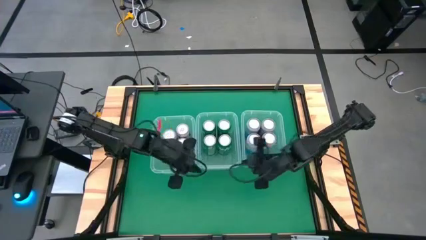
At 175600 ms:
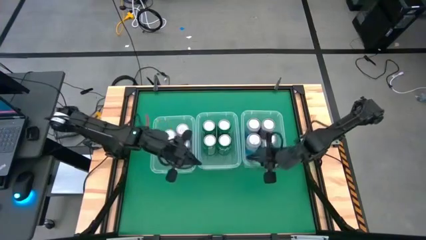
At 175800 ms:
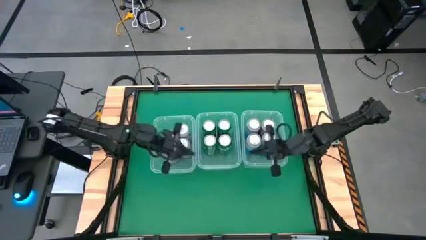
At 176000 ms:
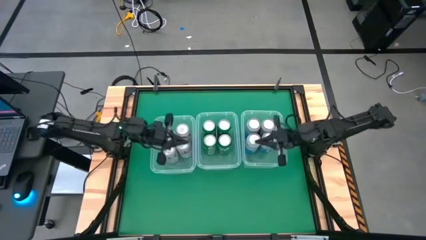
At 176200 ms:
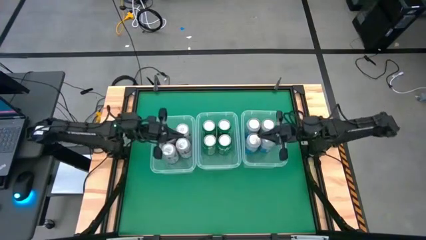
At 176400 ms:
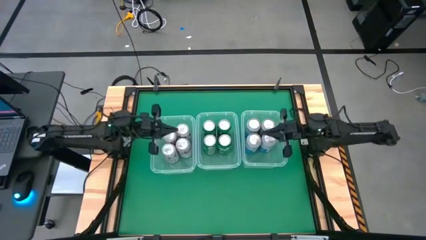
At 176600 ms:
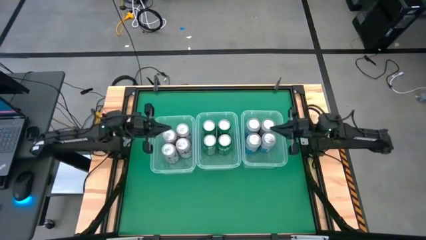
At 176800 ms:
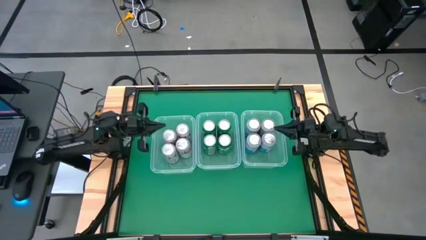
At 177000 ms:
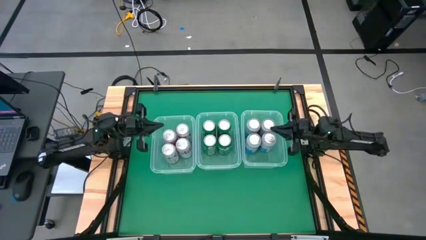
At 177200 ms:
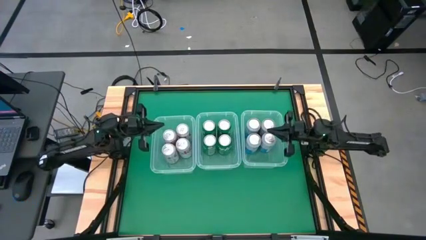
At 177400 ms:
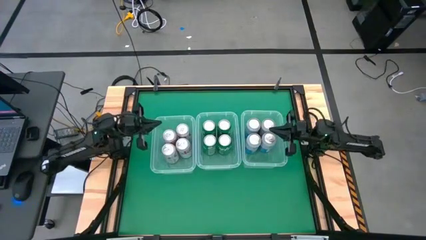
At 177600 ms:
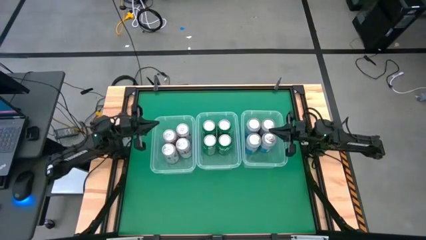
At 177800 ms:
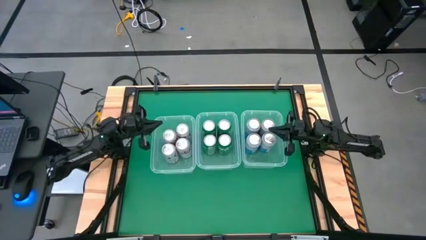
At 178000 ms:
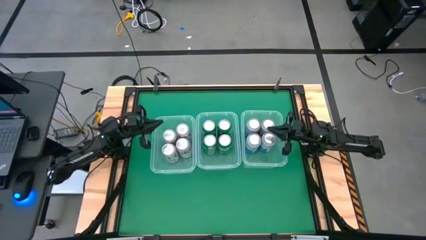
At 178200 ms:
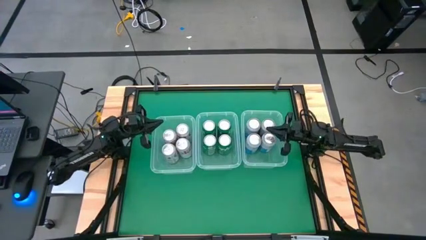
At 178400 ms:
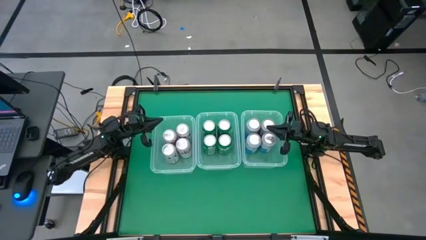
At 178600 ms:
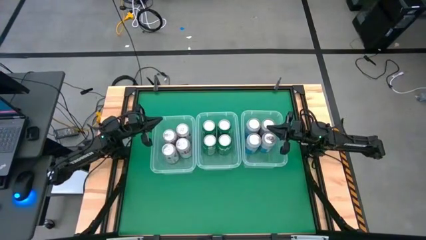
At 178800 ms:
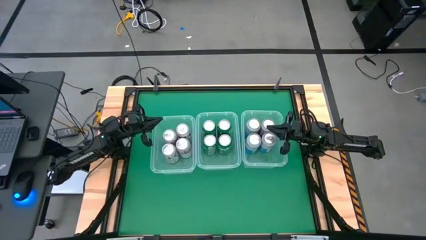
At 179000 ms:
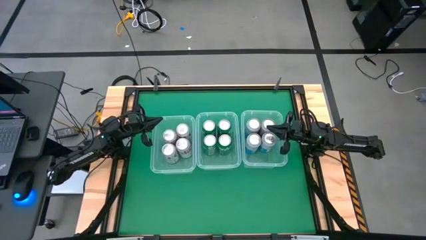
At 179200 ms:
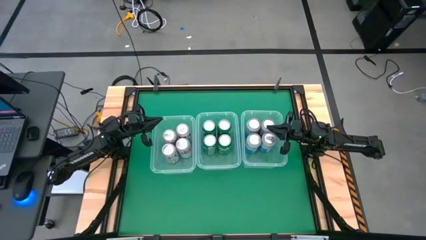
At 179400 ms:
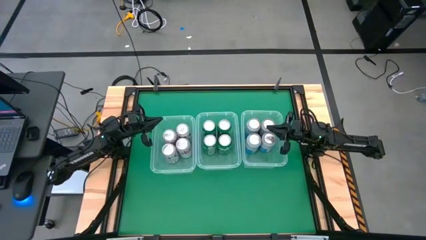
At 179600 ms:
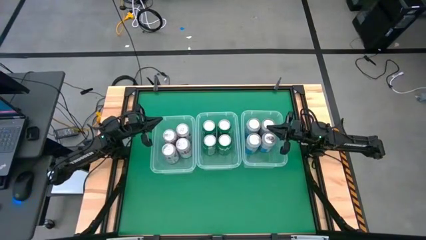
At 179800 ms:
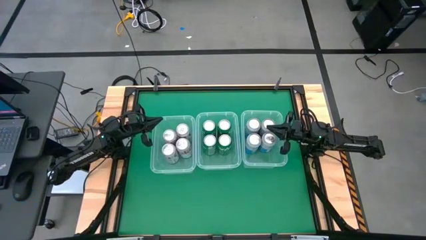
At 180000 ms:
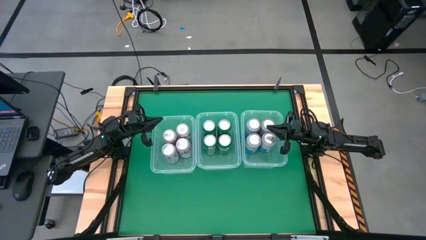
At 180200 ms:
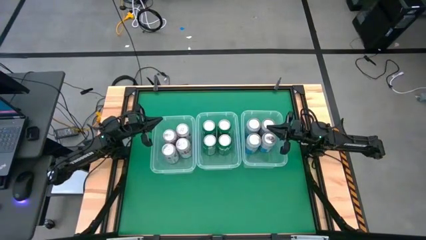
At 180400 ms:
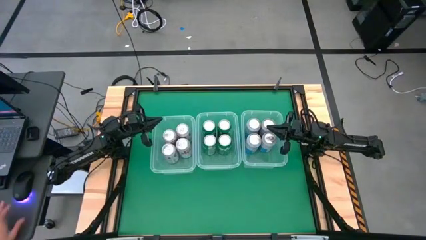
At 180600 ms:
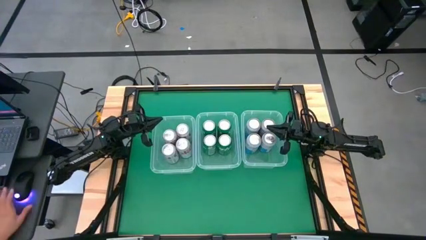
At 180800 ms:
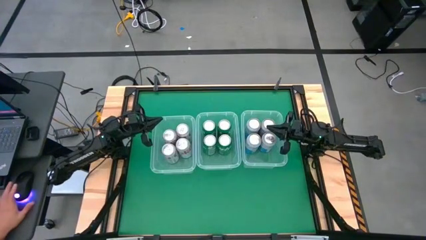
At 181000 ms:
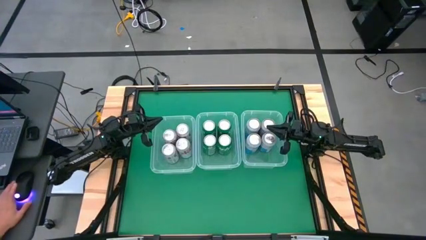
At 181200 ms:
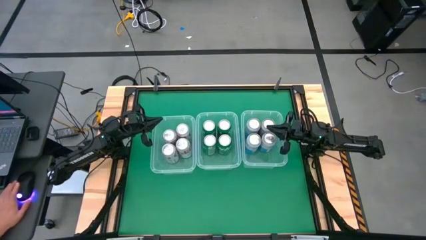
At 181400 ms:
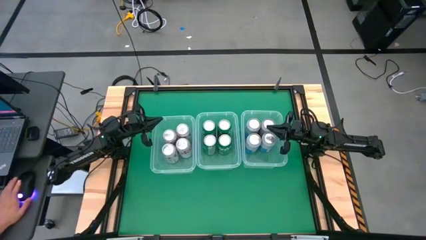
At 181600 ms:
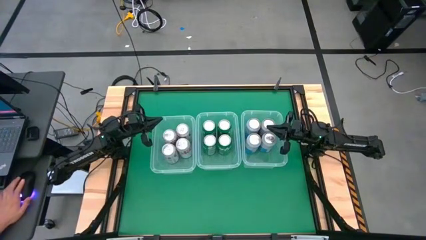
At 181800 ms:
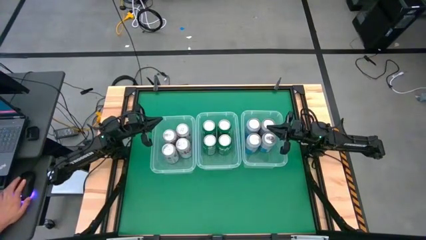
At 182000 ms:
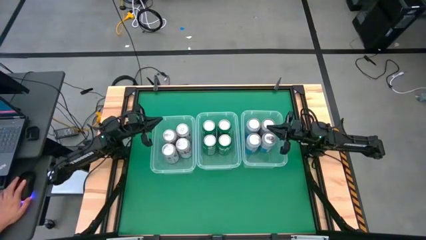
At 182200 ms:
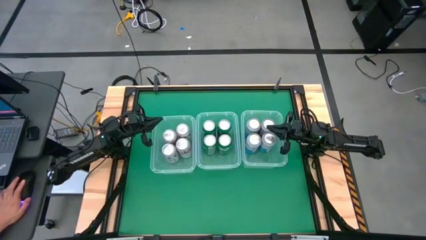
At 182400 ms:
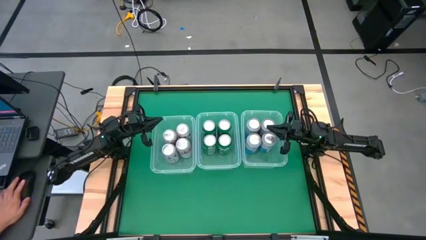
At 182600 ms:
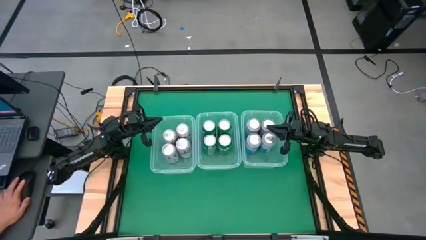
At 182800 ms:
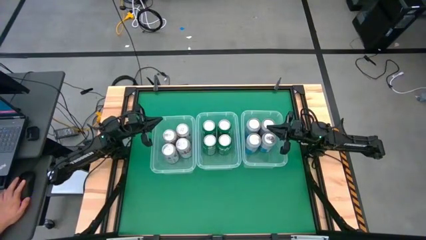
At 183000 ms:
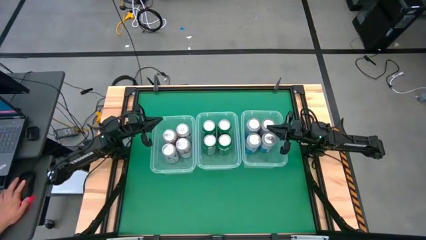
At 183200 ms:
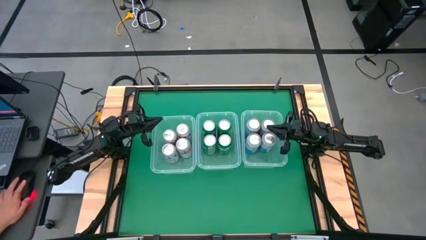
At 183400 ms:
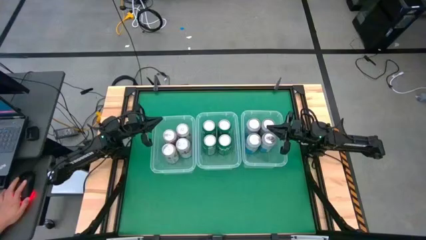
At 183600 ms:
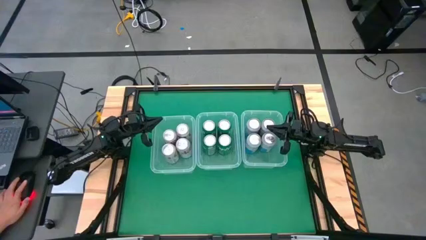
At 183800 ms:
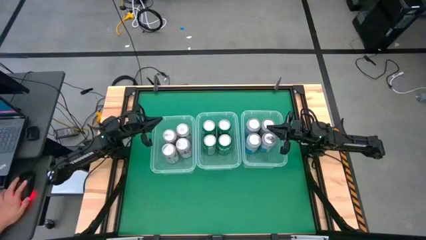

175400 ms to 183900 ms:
Task: Sort soda cans
Return to Home Position

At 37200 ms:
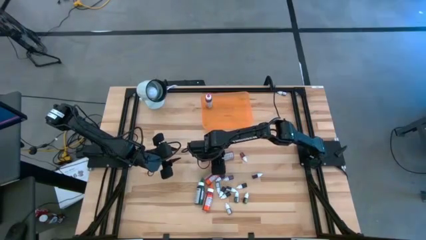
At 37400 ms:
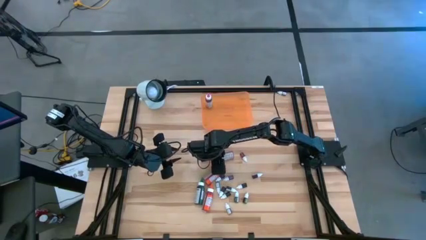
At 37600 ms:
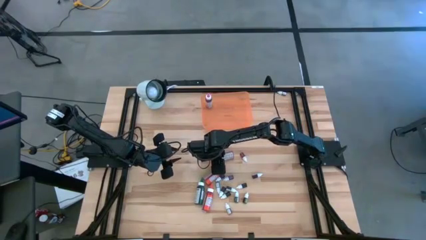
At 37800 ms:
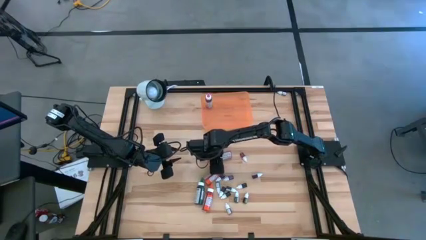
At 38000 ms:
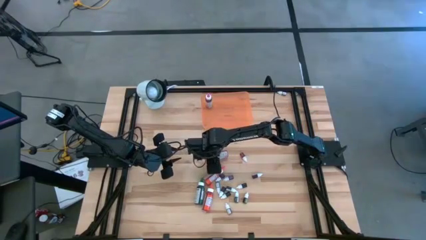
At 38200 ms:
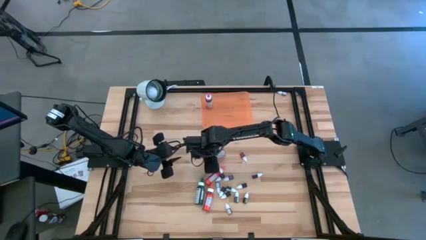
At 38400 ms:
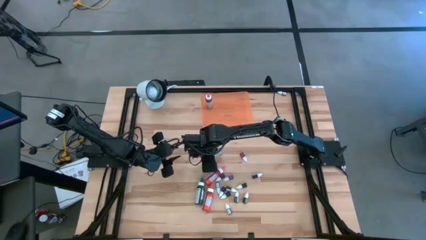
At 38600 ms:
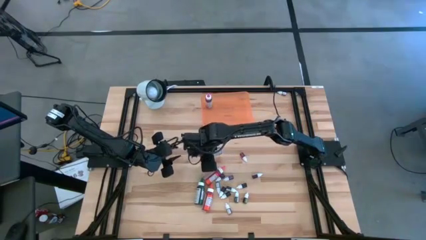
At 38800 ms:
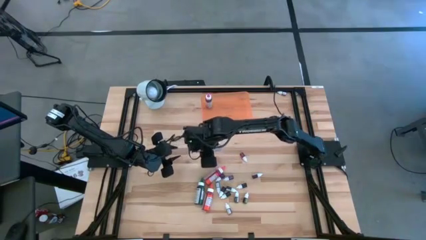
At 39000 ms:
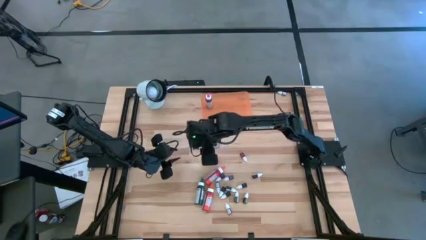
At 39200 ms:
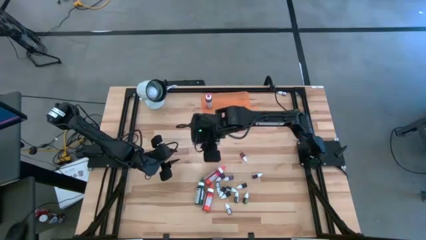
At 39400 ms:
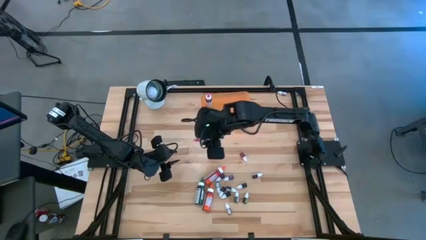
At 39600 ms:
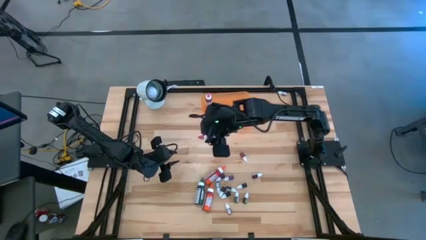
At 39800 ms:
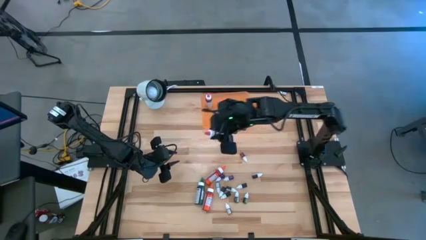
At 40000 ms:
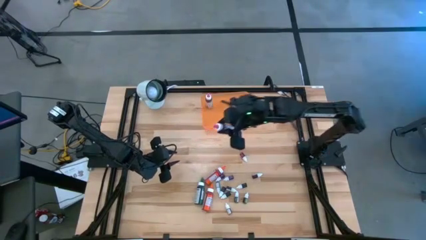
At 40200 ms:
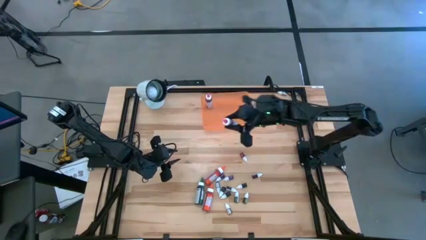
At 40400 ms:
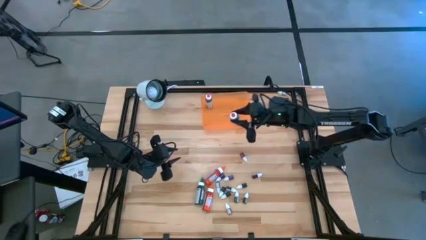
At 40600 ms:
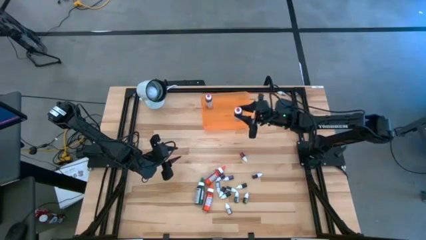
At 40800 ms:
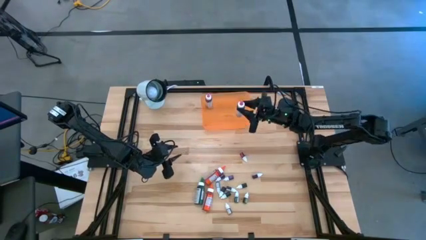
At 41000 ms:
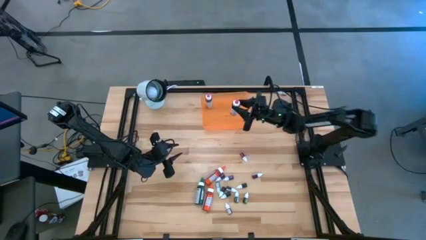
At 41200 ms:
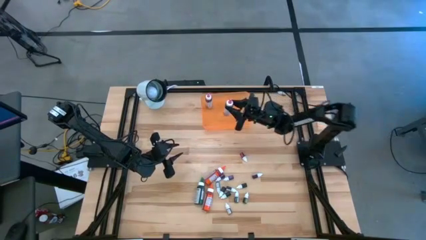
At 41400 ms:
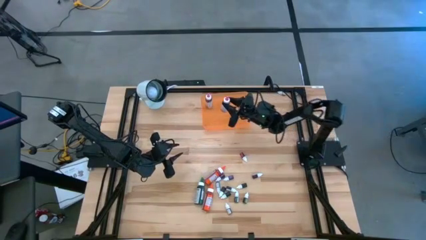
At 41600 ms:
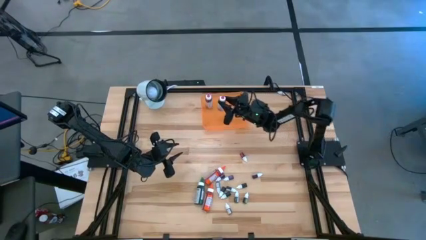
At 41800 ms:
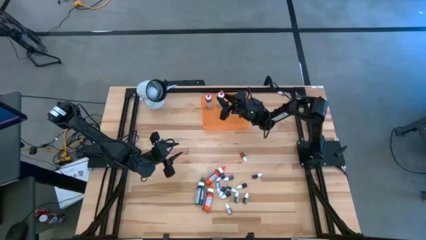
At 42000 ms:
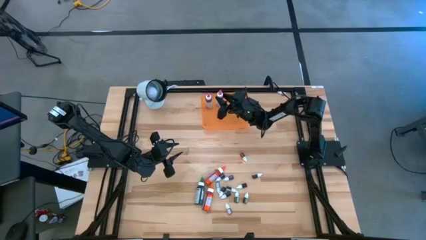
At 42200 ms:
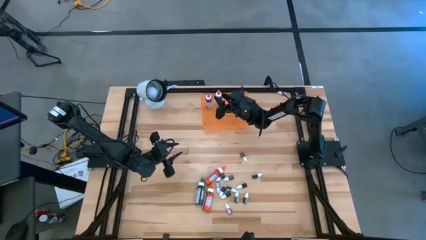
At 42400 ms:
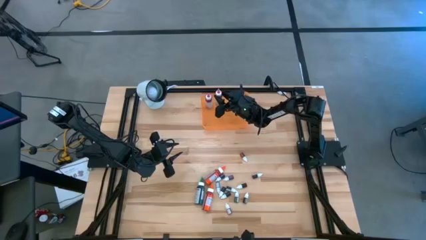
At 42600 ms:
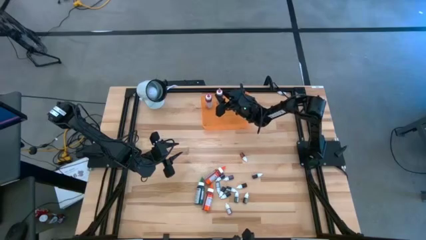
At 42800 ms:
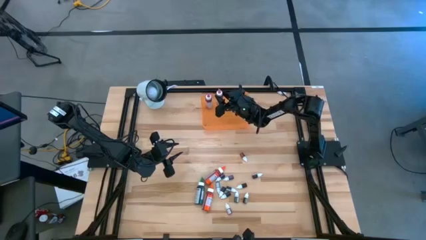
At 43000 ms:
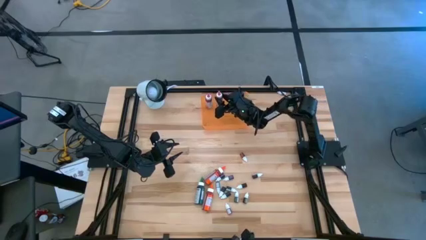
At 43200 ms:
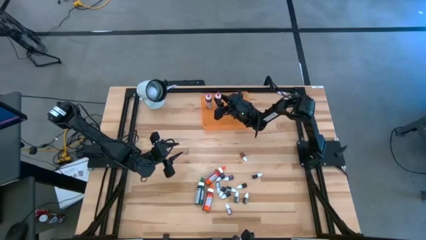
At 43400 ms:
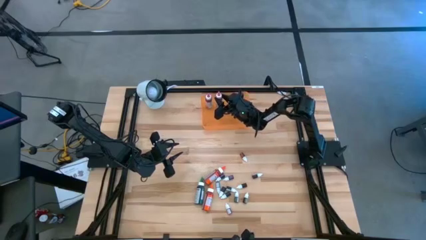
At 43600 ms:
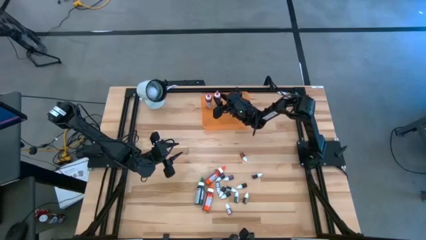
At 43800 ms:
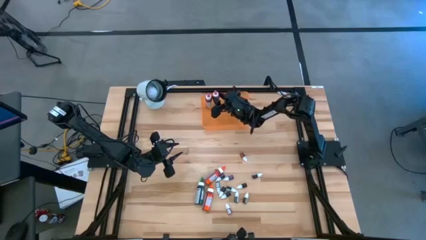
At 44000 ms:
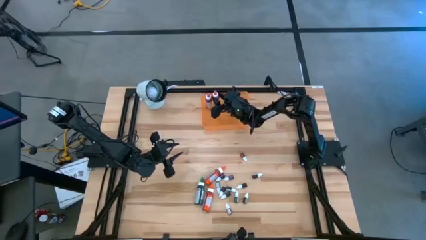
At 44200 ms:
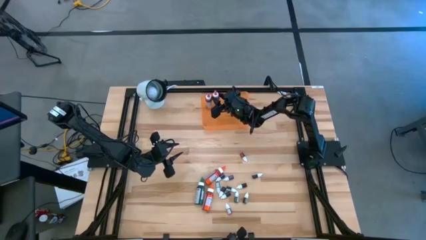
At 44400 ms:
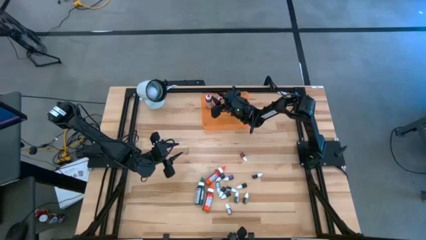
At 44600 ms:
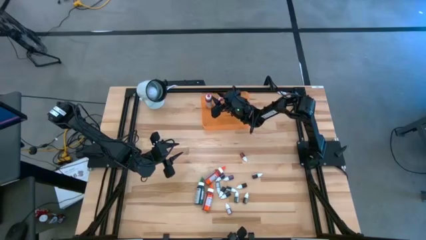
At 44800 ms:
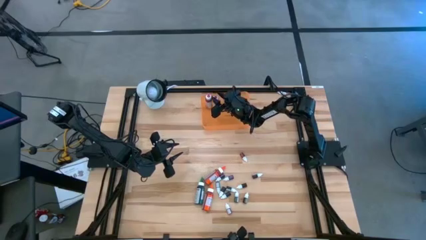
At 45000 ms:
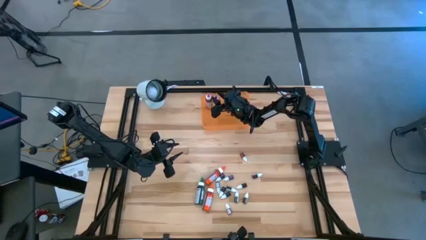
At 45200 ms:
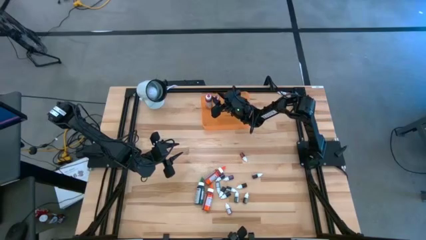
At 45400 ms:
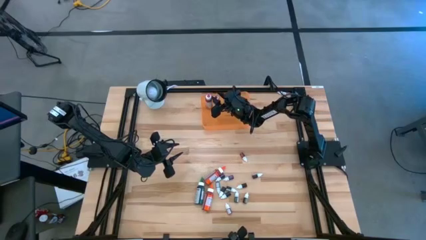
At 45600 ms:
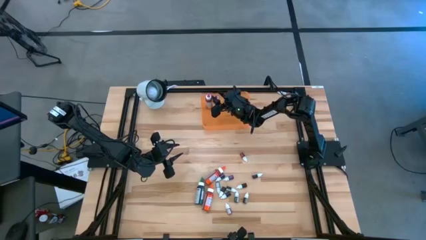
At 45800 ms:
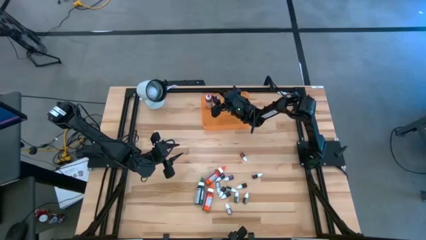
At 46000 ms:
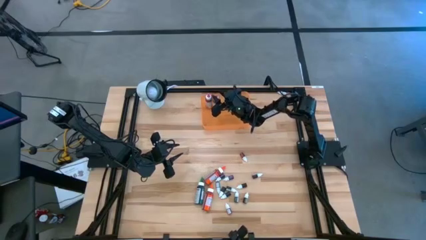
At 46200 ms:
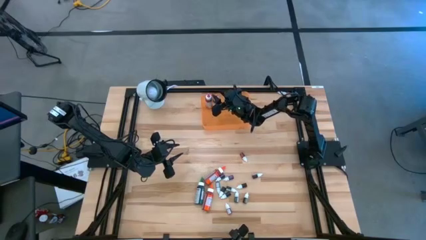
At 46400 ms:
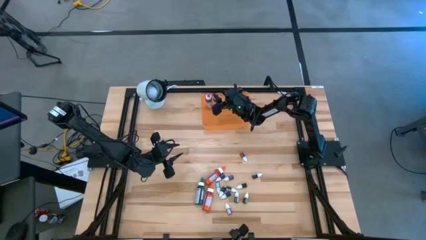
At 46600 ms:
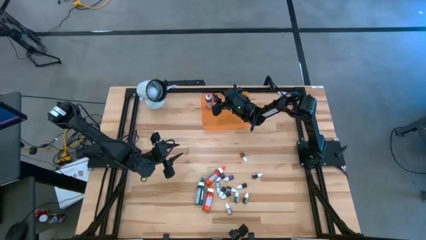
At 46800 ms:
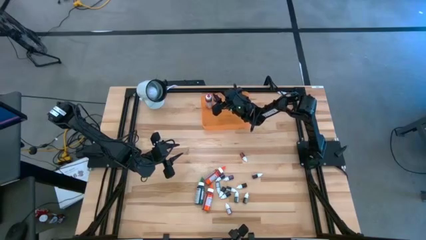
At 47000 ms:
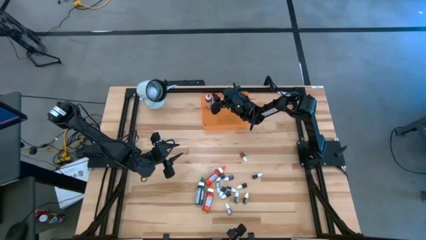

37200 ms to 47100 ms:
Task: Pick & Place food coloring
Put the large pink food coloring bottle into the orange bin
